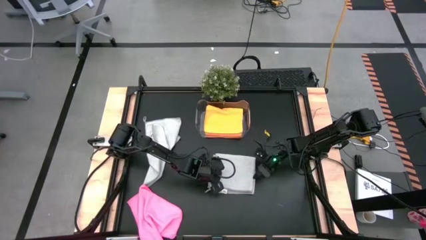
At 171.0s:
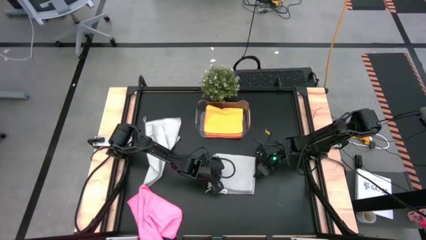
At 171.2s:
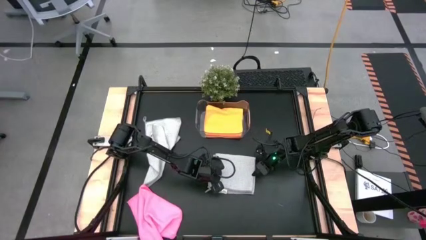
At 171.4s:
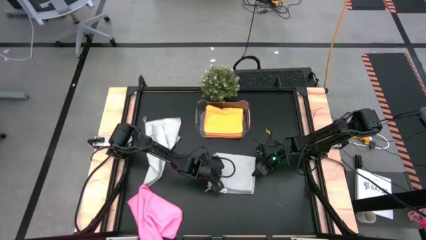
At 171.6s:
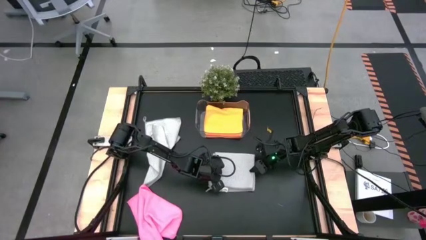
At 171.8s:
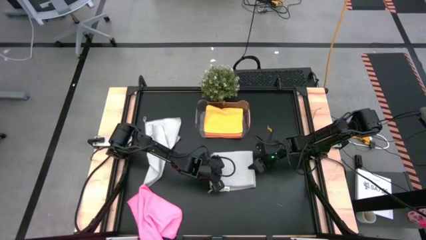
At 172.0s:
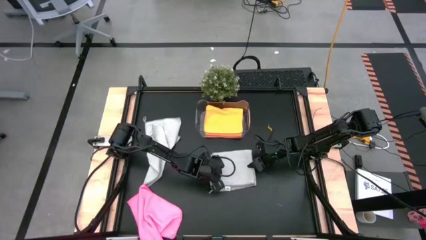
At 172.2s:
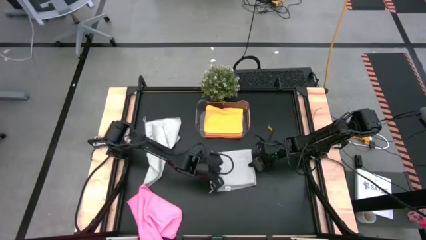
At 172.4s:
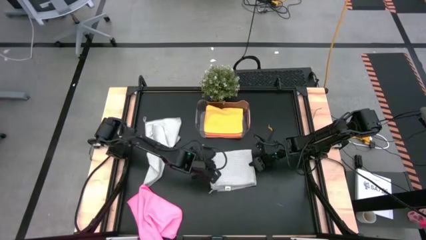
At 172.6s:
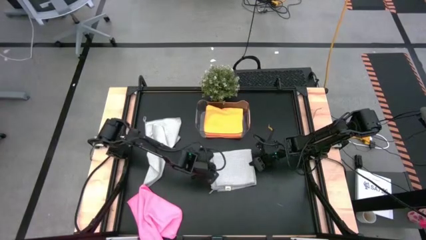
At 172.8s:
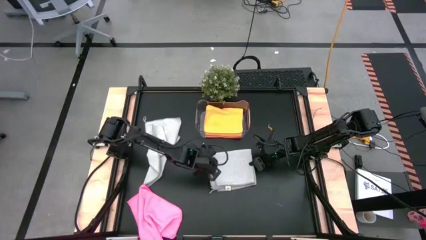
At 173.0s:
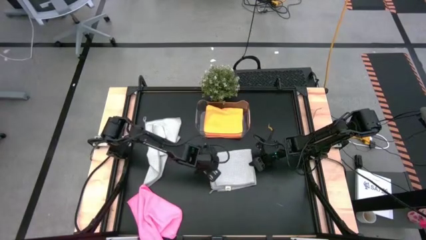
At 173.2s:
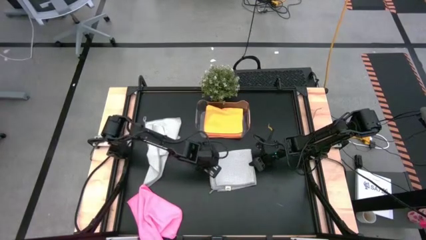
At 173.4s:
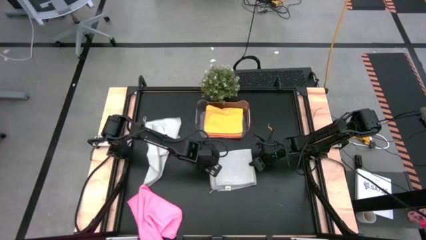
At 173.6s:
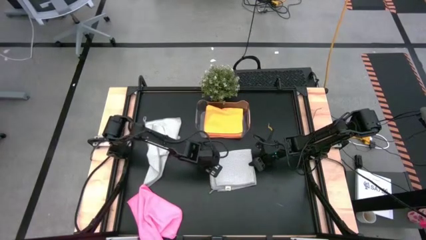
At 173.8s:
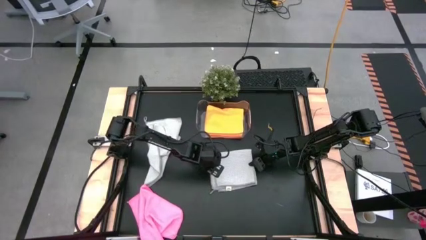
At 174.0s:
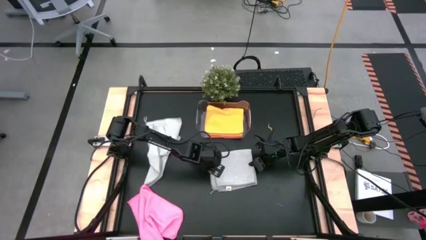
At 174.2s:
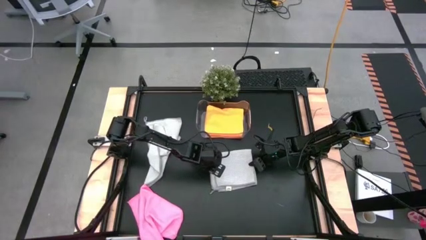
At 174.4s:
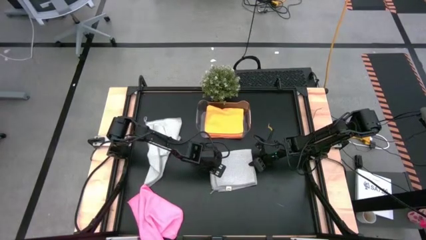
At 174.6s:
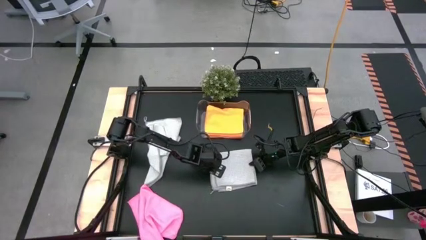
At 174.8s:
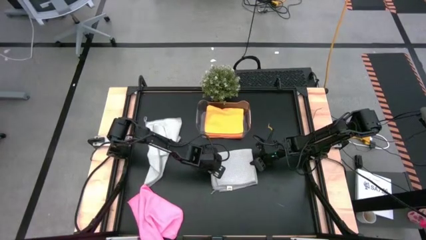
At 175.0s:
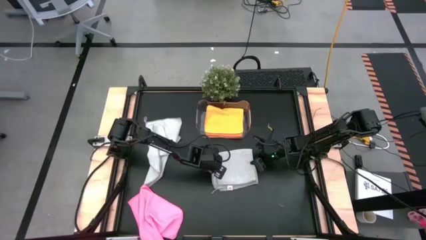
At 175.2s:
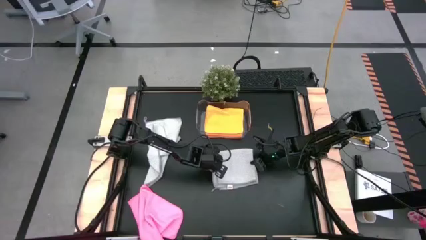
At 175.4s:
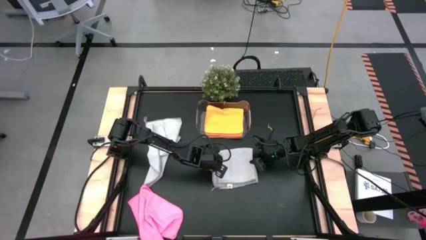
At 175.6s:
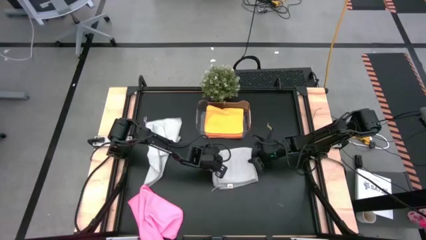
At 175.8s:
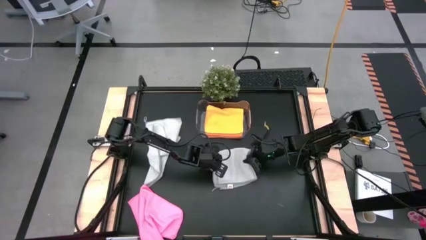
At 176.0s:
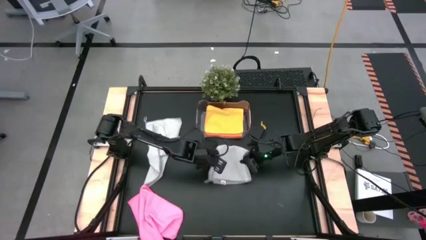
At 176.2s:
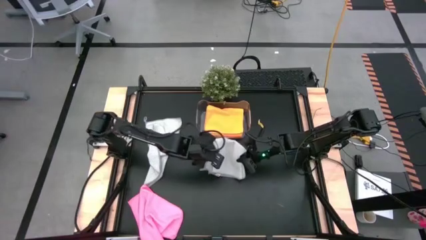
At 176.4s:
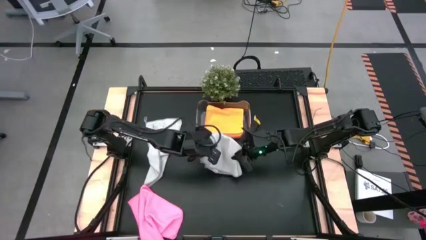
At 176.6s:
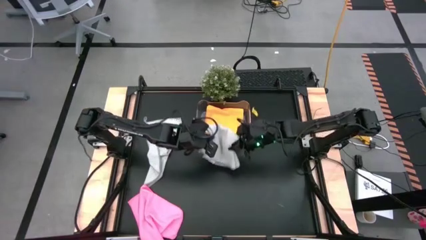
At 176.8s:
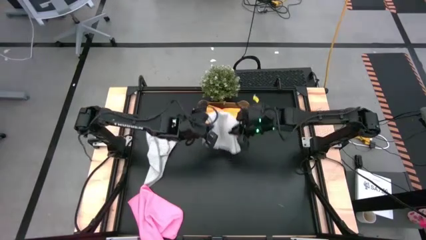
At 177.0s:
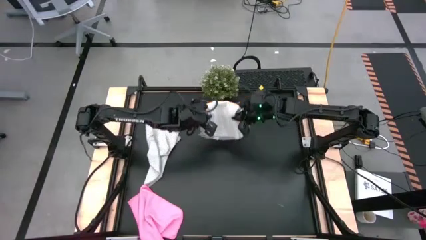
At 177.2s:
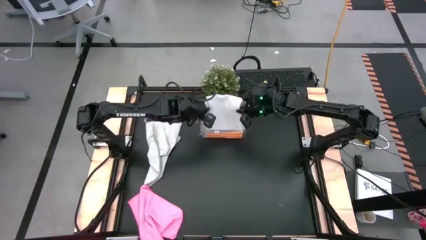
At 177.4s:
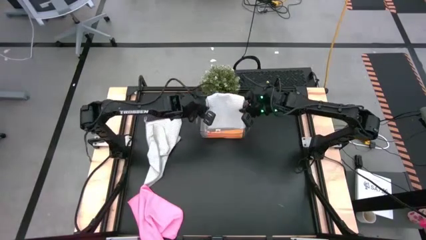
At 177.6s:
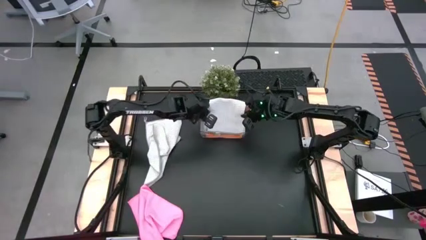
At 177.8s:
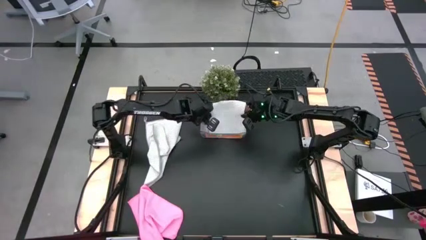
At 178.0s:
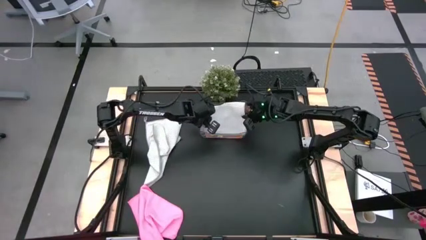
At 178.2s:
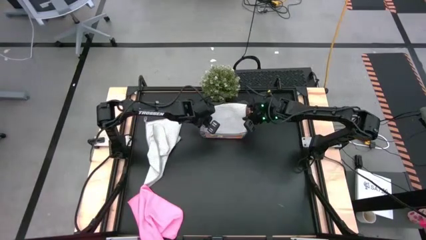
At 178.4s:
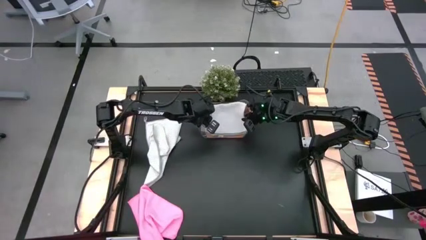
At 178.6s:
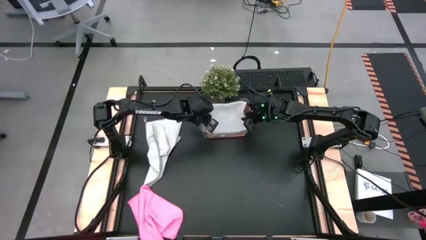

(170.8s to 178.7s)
Task: Fold microfiber towels
Put the folded bottom gray microfiber towel into the transparent bin

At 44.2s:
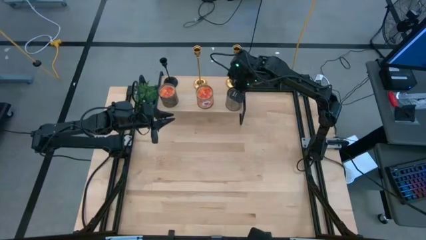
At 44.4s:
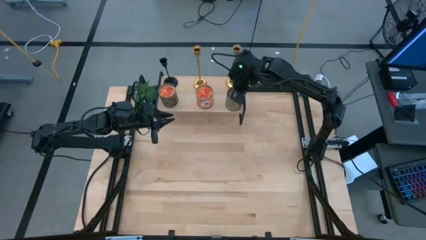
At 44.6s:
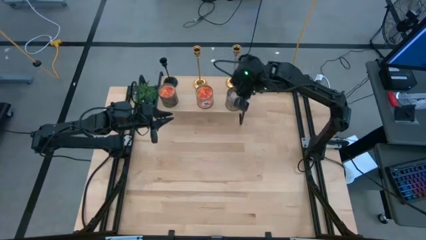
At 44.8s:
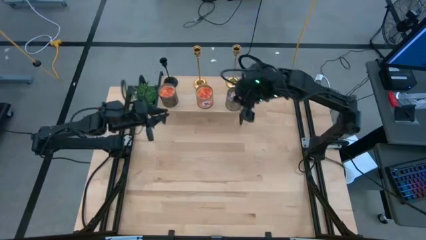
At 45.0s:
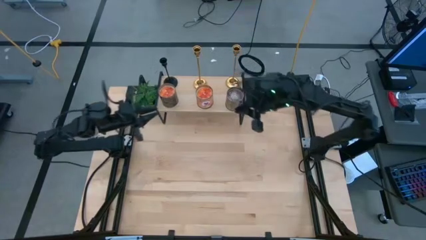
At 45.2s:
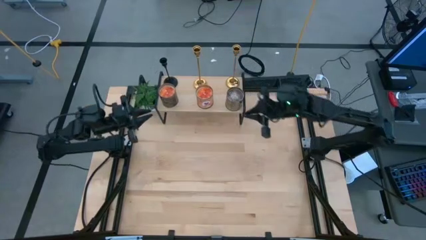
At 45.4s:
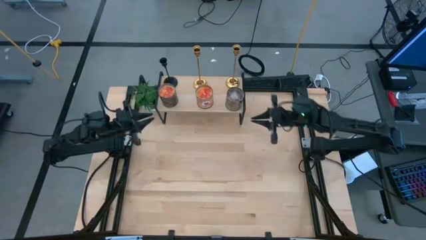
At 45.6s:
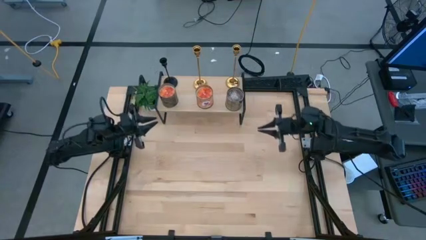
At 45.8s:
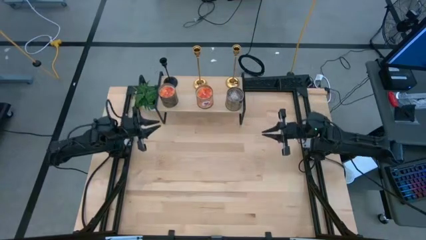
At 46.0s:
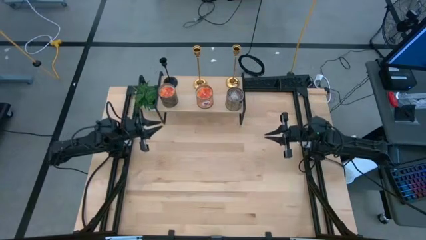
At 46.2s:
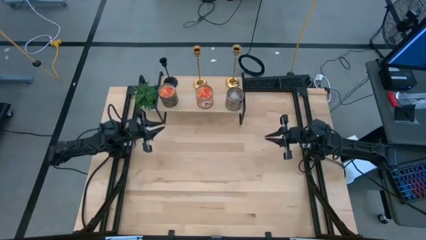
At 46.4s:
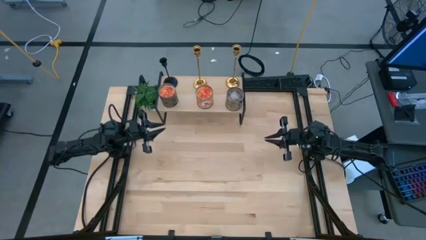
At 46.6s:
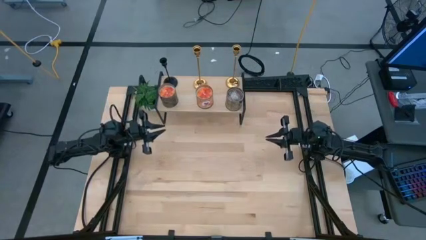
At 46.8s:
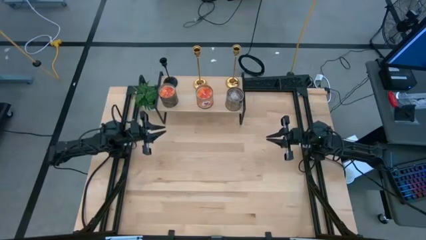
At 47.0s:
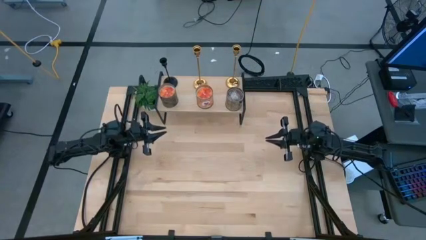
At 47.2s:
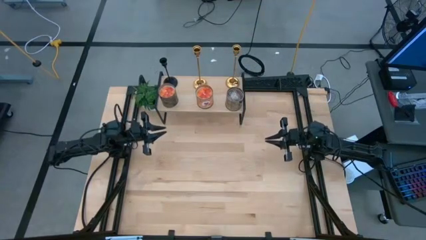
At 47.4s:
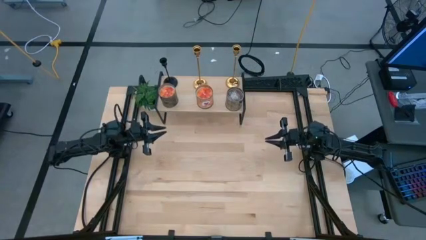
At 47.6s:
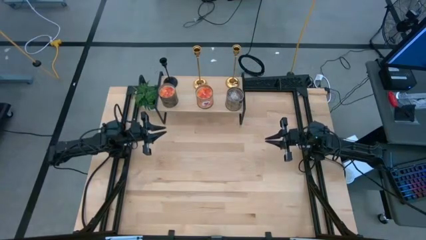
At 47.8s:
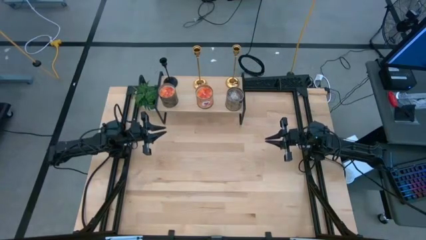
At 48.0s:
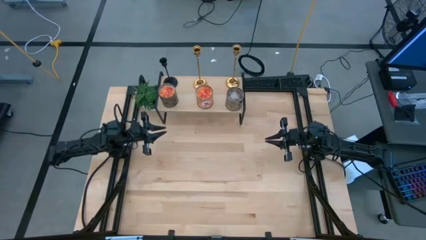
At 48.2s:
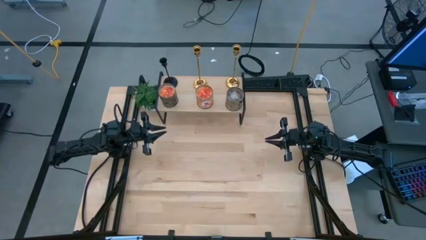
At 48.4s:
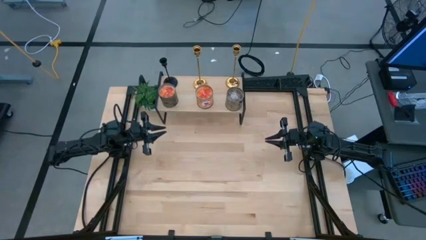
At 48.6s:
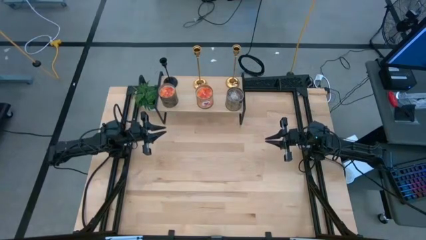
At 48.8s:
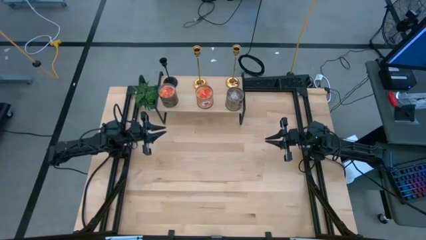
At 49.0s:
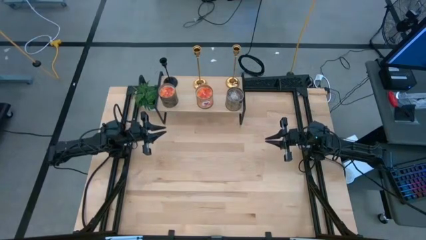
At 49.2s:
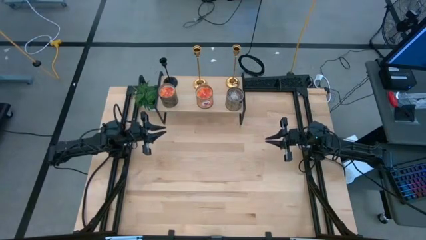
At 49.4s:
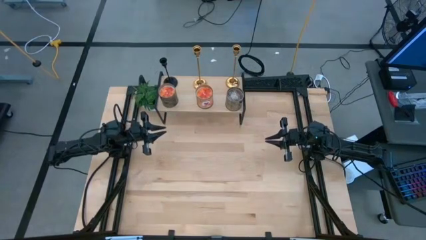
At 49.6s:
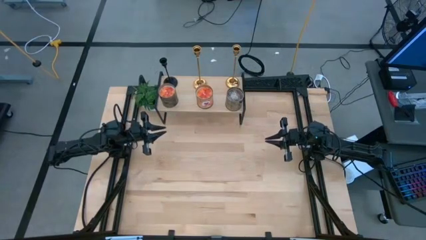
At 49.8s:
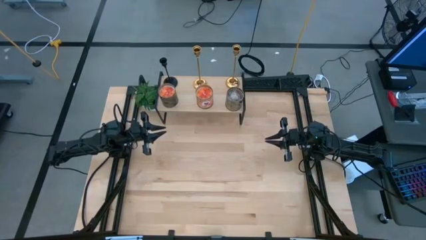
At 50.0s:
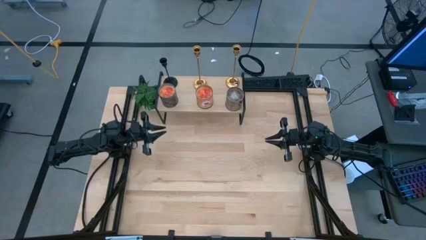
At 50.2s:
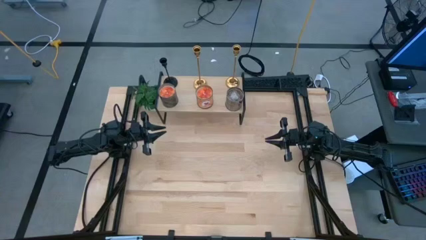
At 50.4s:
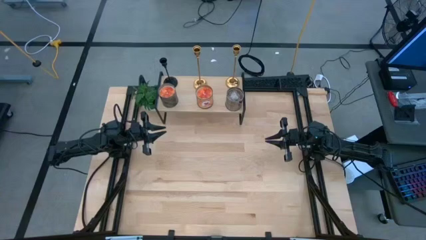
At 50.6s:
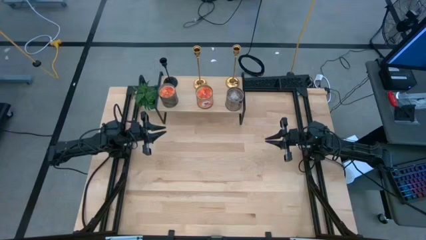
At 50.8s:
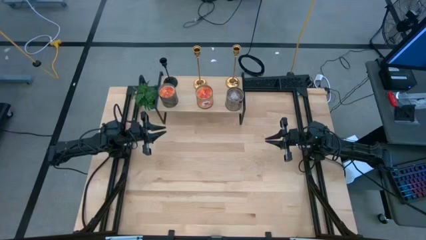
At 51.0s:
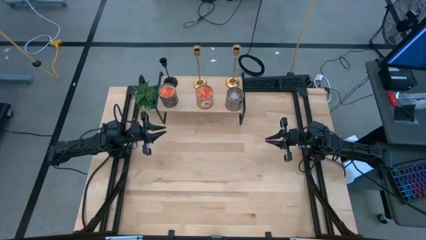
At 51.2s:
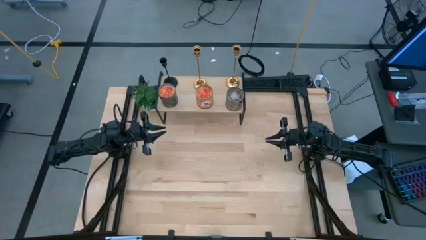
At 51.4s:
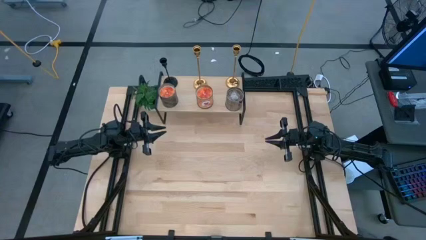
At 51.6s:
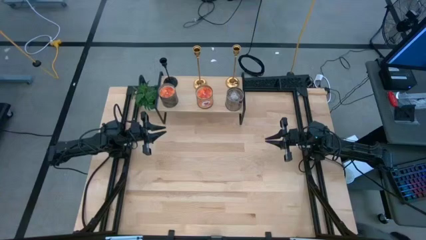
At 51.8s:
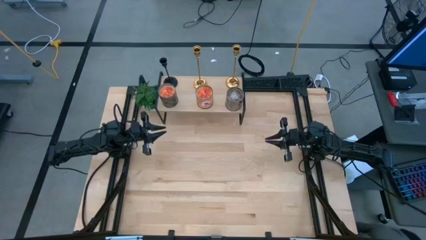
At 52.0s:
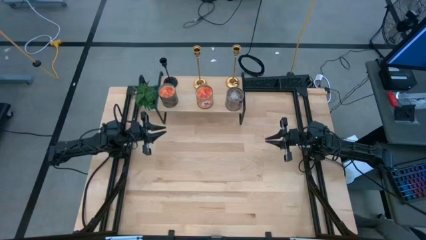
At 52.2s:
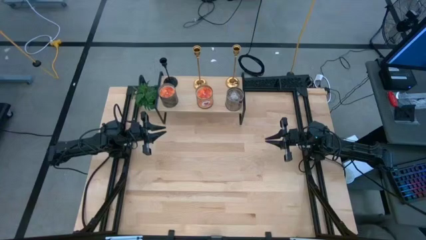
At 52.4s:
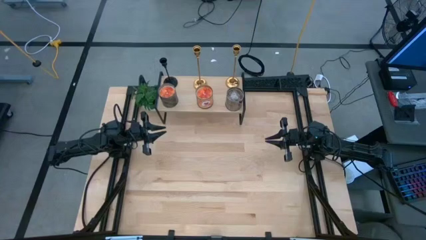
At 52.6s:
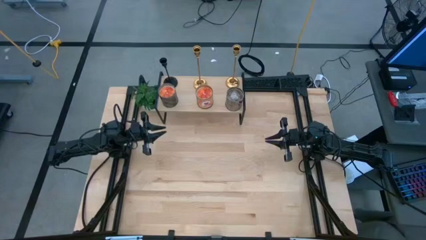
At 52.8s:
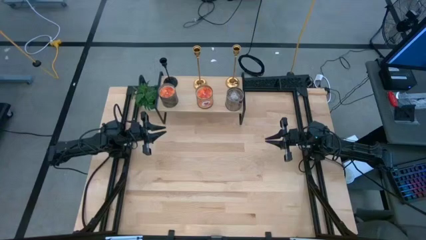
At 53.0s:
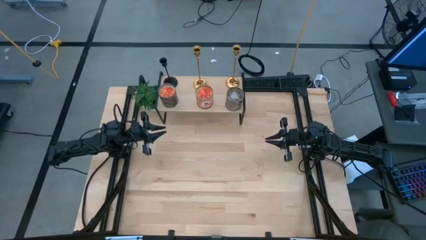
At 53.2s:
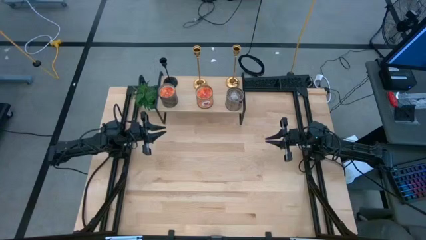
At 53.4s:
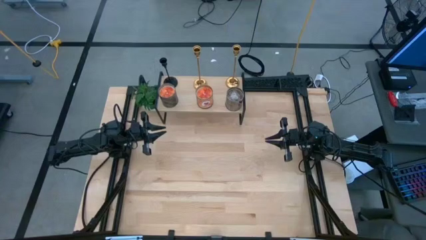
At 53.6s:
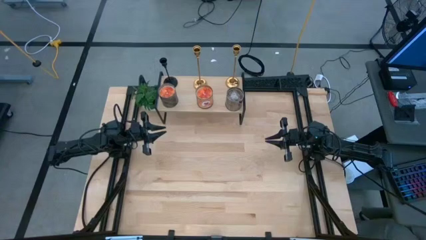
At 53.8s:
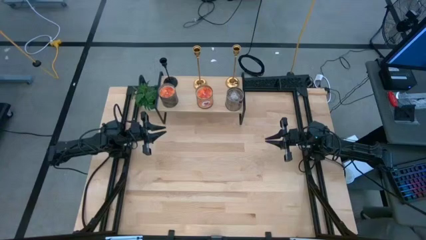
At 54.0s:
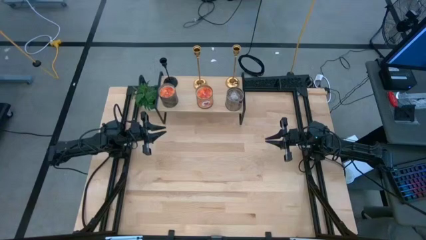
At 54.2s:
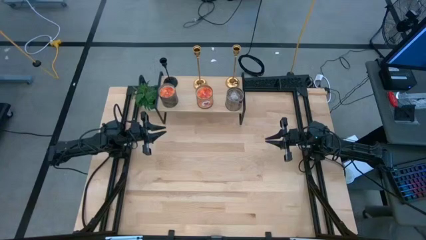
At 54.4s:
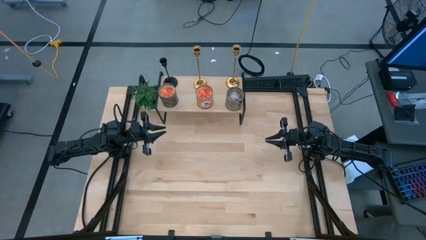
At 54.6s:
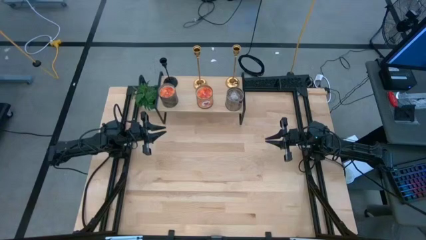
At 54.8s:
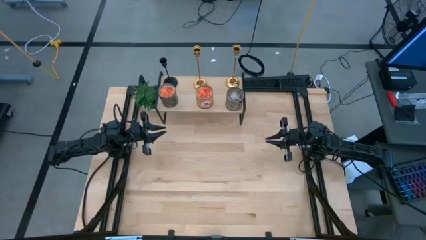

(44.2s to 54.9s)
Task: Pick & Place candle stick holders
Return to Home Position
